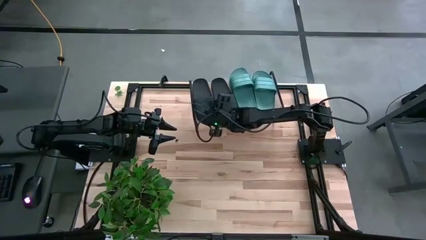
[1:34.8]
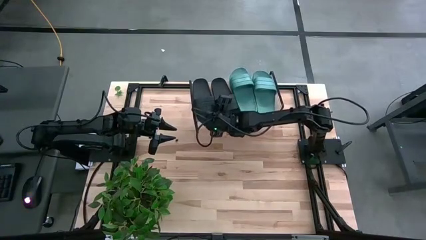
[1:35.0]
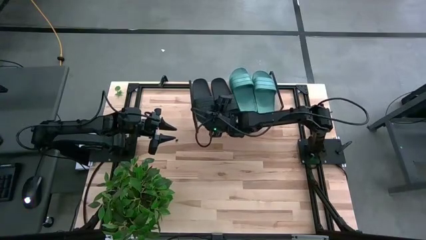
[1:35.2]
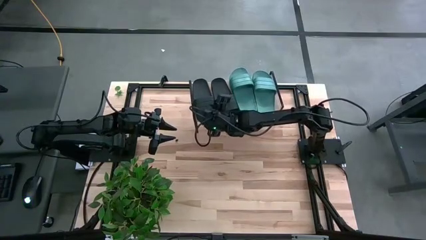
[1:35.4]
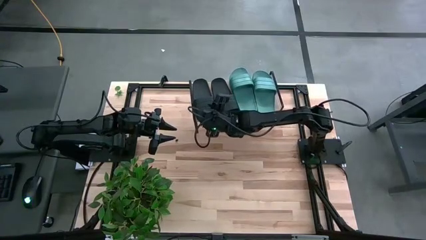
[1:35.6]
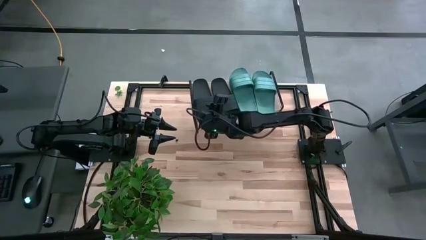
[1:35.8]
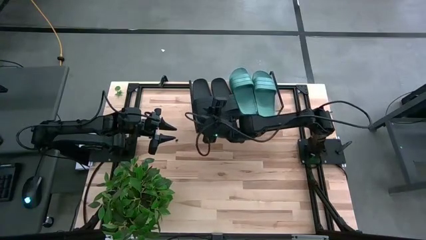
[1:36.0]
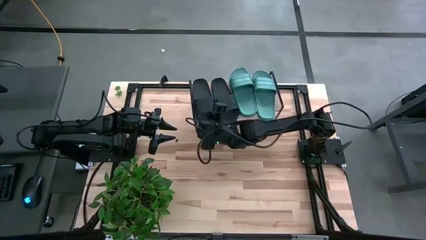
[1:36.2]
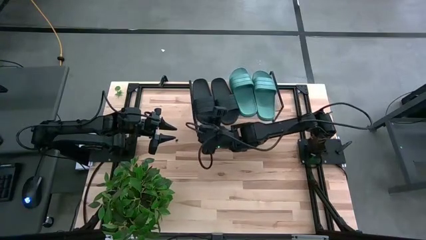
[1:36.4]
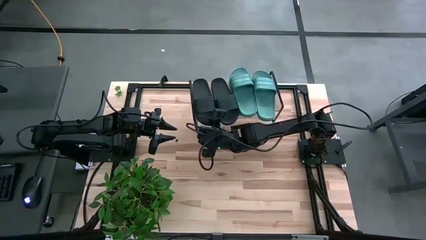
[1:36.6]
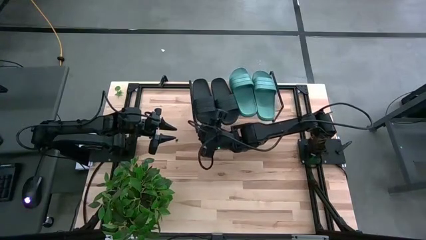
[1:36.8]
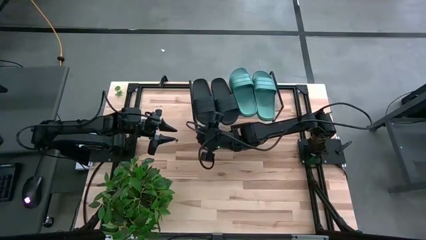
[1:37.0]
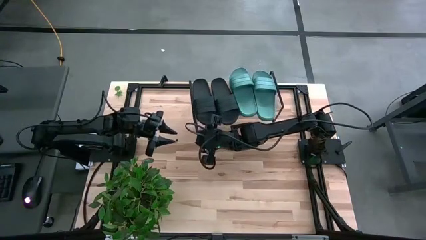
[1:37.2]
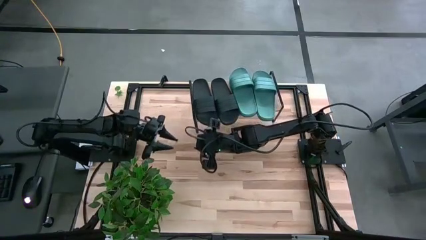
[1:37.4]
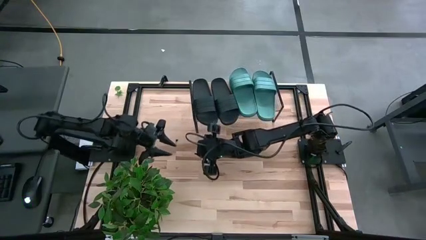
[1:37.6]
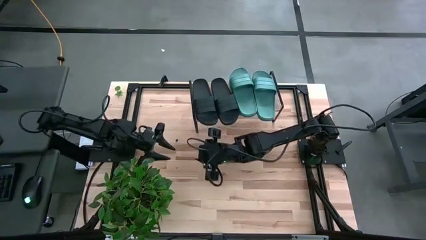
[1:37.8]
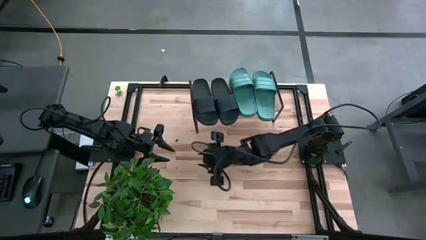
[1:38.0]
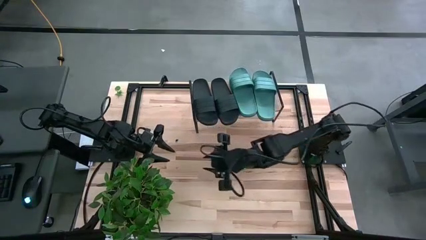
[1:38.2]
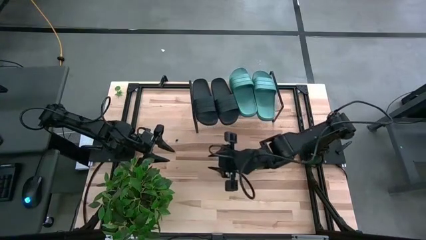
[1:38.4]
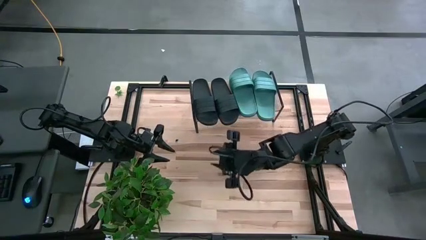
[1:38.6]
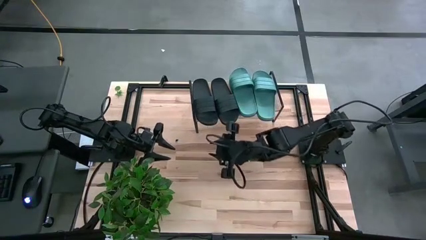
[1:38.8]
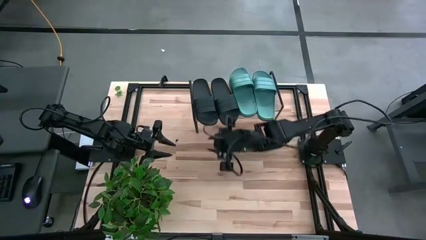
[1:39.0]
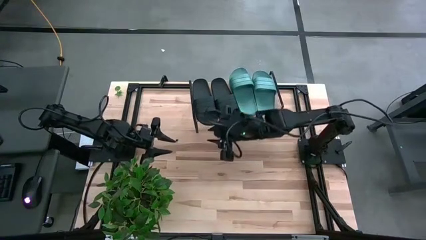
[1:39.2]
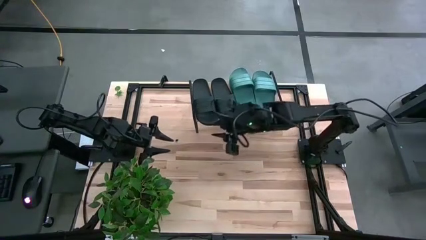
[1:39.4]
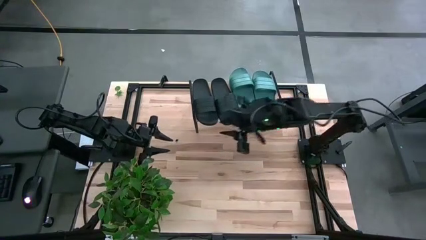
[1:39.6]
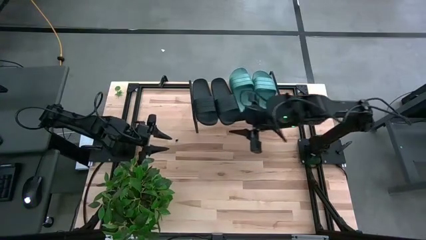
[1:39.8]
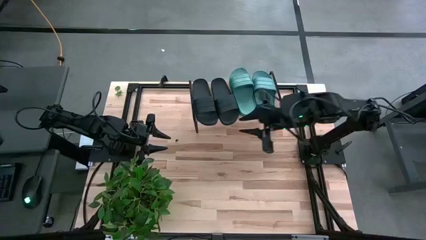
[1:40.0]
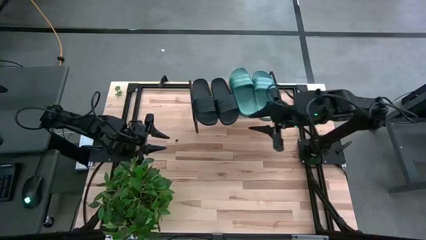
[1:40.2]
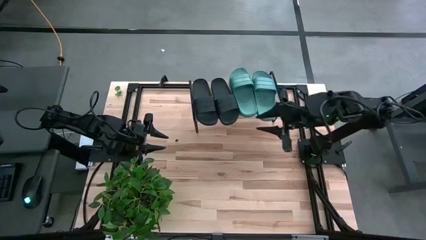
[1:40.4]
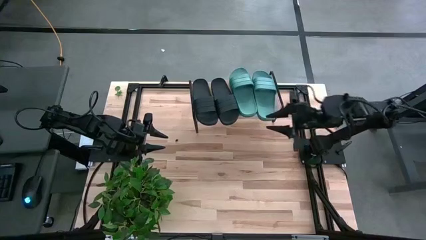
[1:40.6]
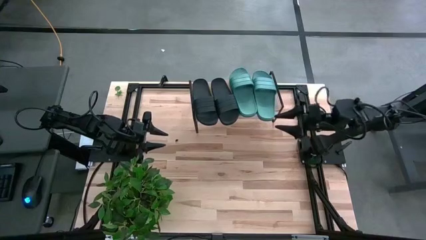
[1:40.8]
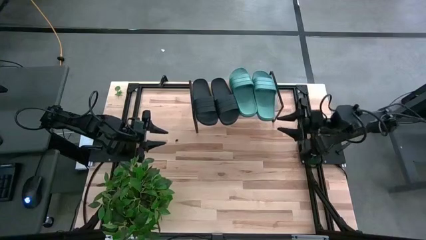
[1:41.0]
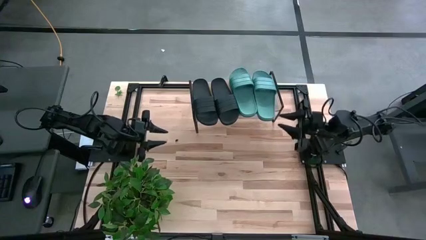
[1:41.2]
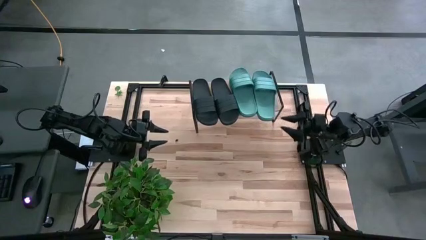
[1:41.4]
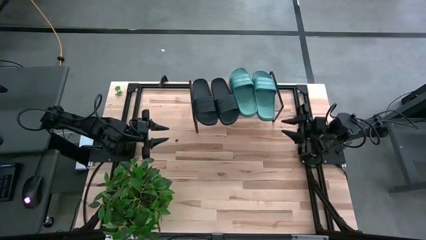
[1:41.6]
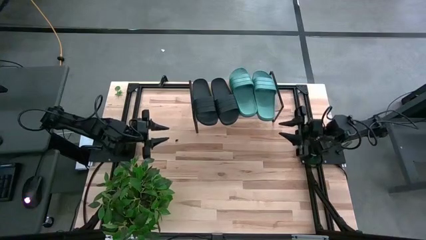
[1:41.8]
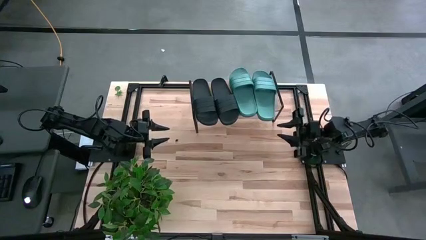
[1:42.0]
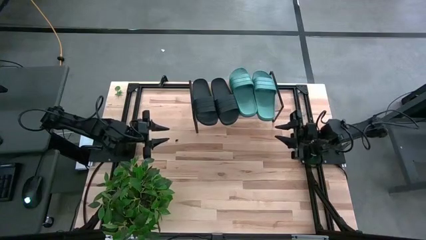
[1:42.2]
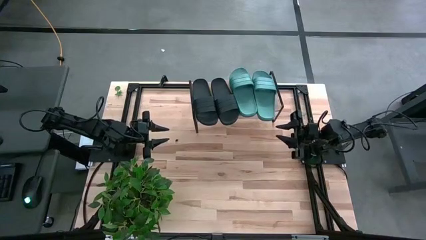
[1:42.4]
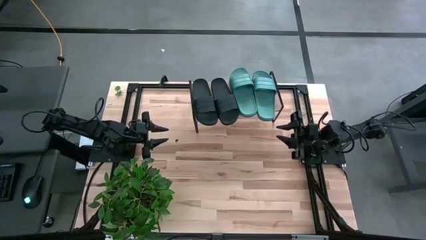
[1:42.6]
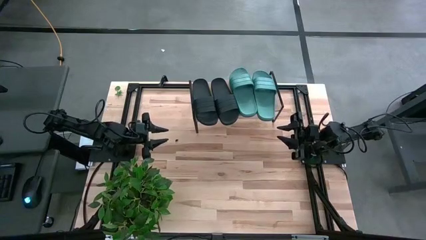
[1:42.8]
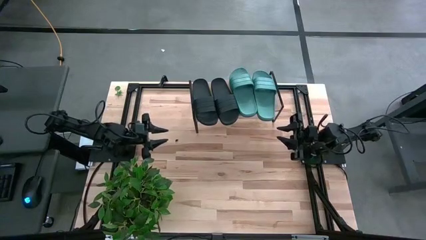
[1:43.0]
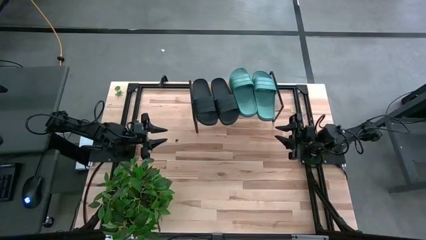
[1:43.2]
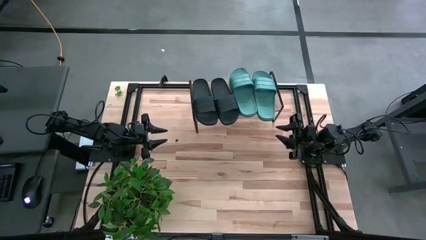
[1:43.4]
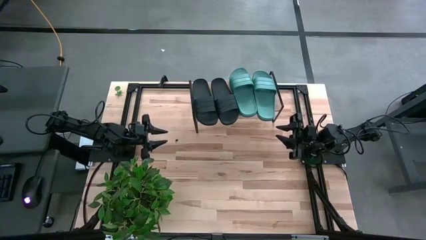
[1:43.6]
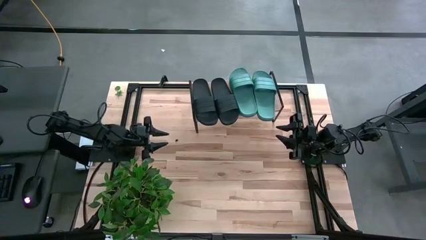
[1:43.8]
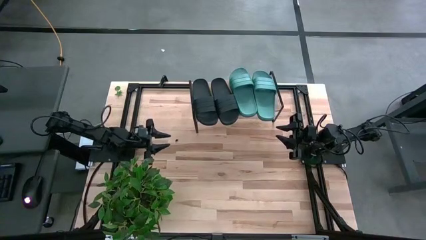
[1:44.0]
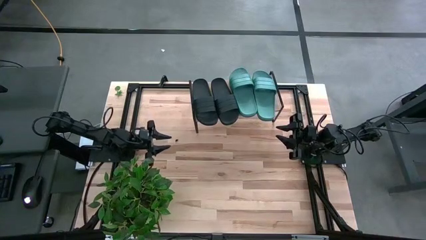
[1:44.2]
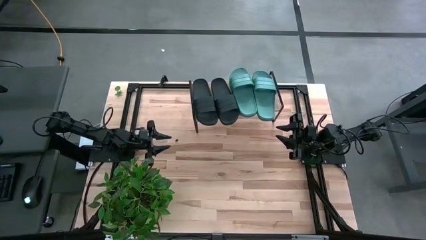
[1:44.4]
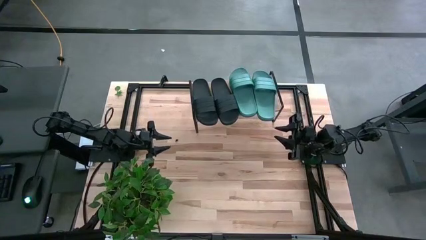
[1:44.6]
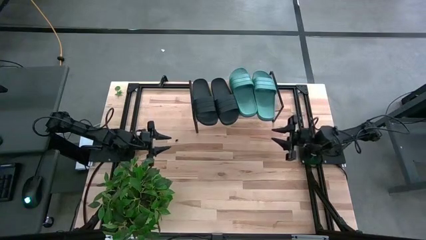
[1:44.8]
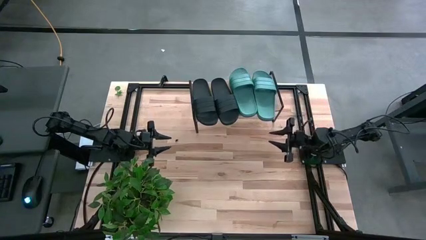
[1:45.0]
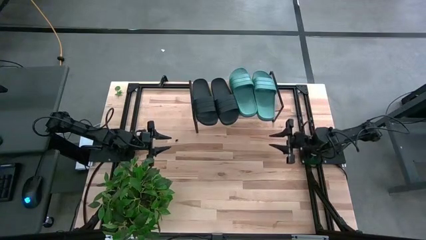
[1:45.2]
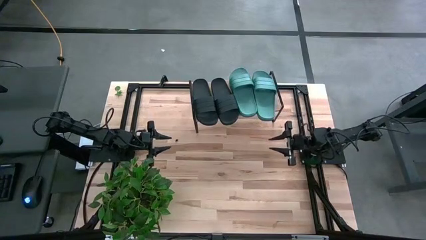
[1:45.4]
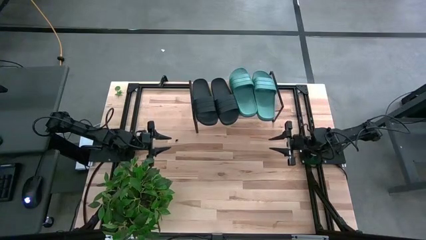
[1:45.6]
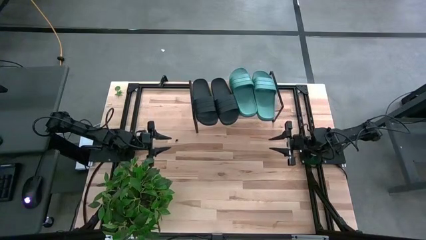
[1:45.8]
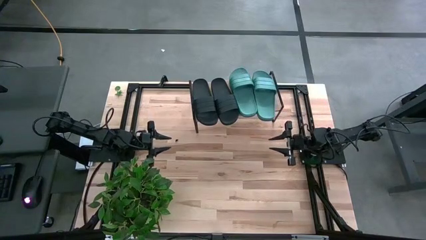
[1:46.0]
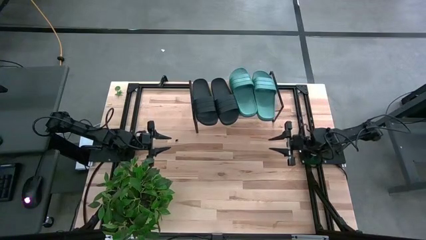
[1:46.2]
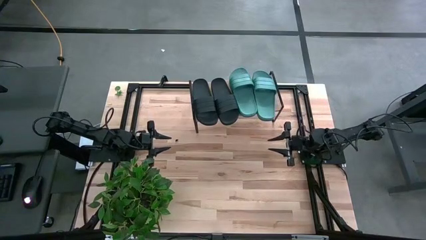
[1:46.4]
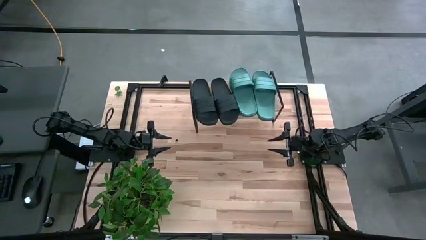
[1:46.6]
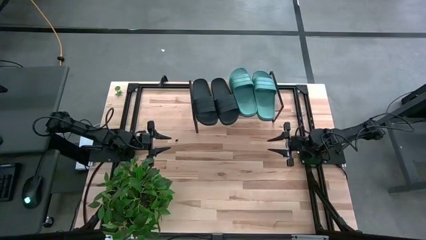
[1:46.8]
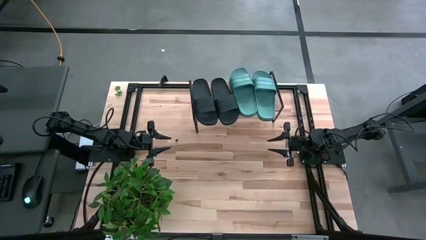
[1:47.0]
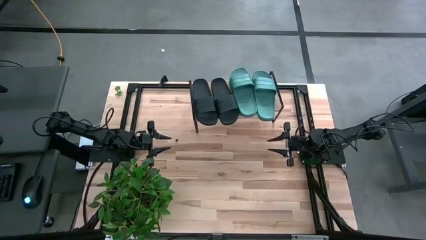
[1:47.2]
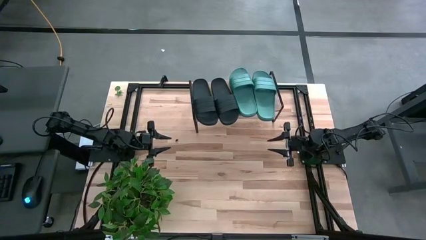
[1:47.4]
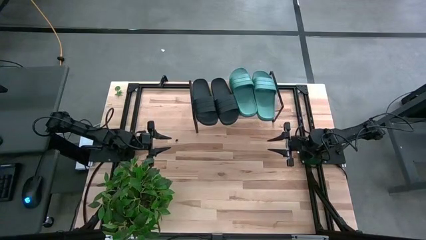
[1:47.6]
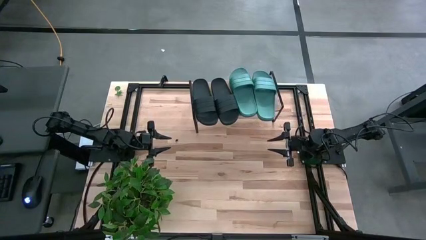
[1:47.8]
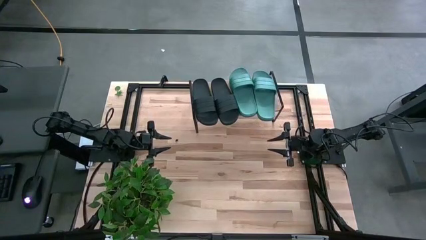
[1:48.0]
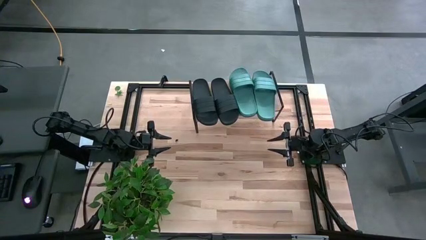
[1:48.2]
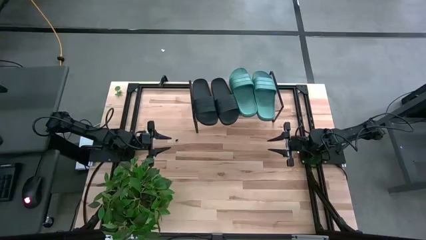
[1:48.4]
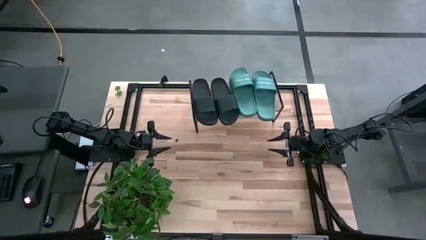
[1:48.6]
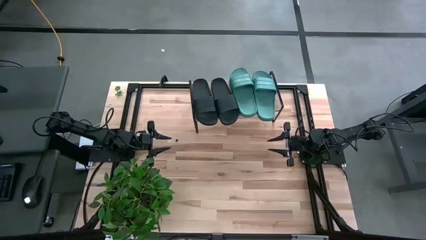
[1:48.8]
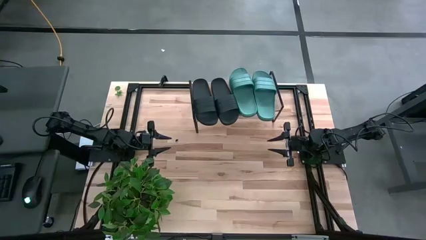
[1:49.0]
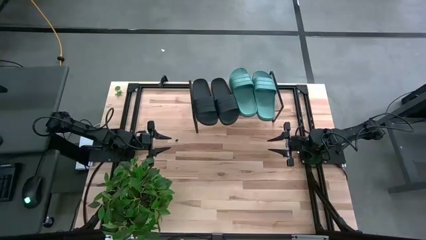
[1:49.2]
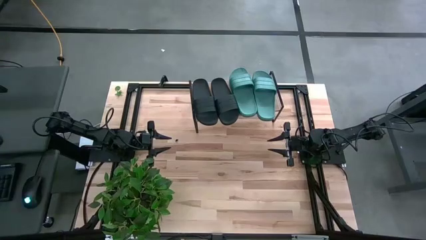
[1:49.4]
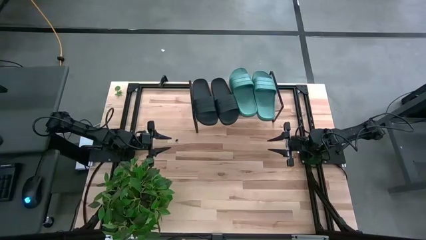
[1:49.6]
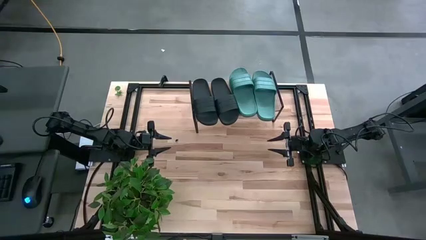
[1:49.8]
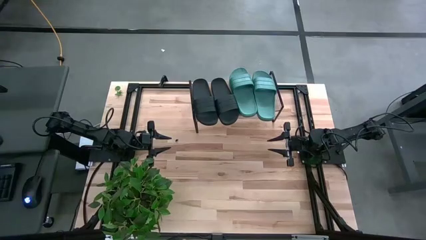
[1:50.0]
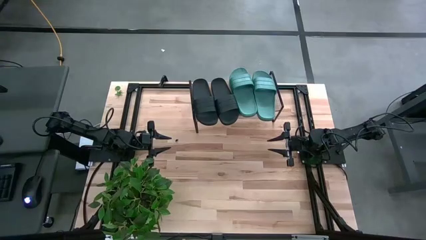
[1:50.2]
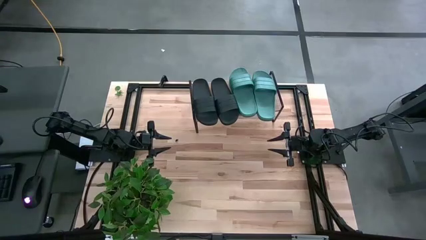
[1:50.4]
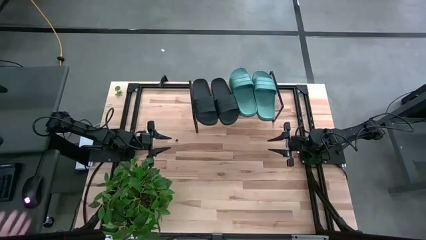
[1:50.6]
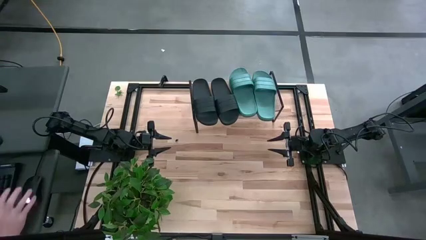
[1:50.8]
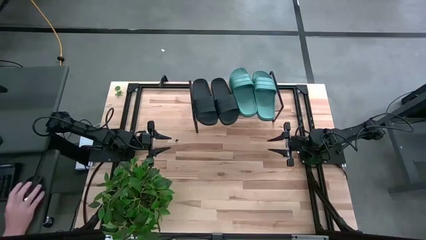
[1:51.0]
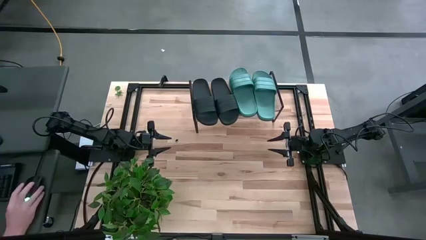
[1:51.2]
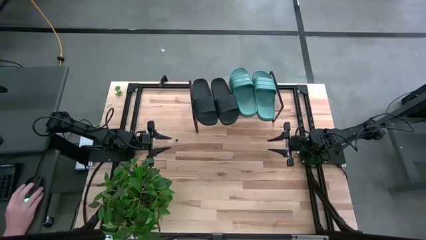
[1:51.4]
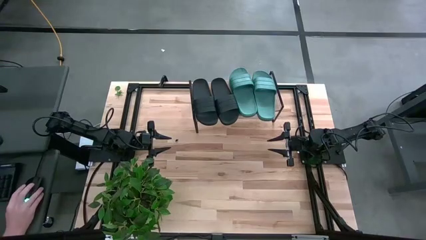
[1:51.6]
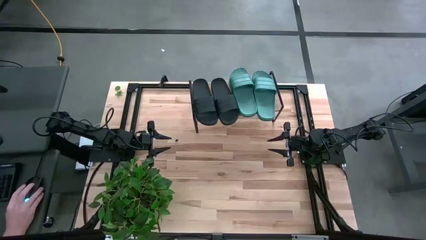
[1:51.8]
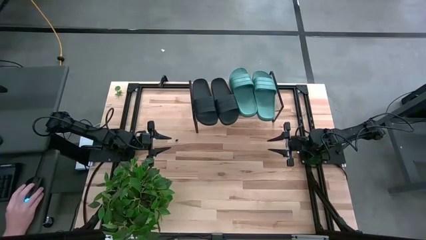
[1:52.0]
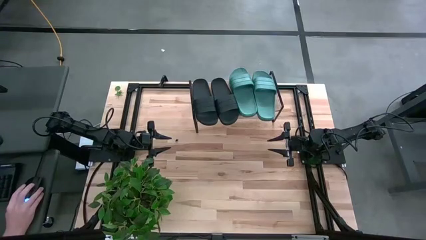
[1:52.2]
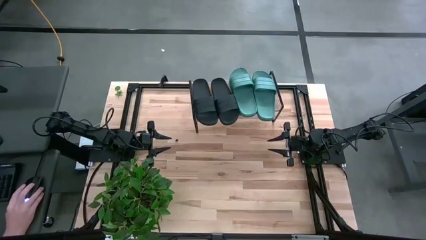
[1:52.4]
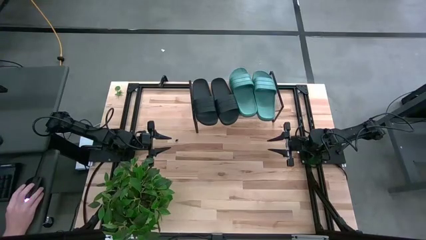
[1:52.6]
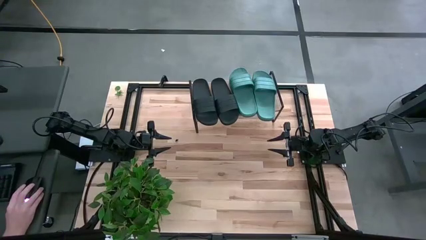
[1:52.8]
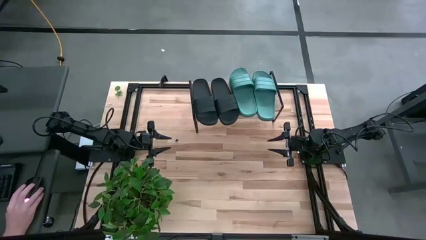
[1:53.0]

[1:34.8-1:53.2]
Task: Pick and place slides into the shelf
Return to Home Position
